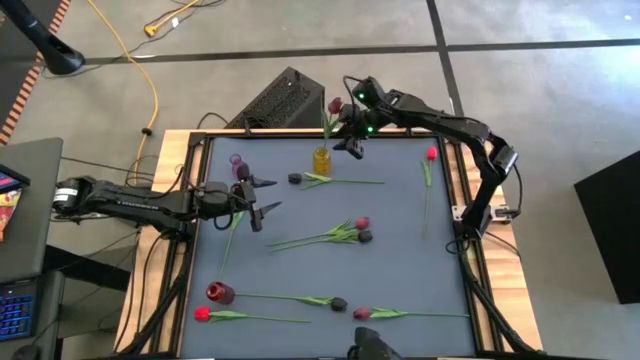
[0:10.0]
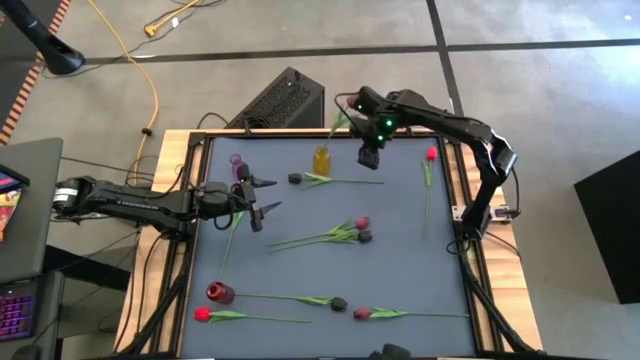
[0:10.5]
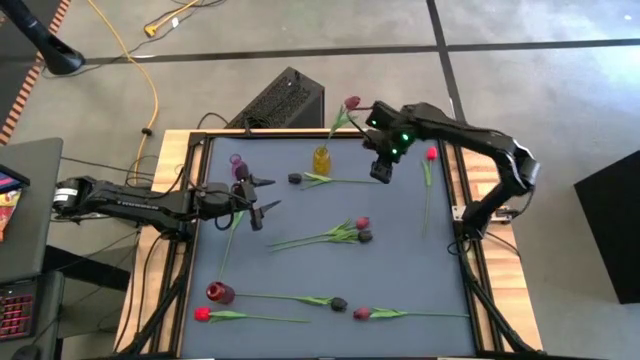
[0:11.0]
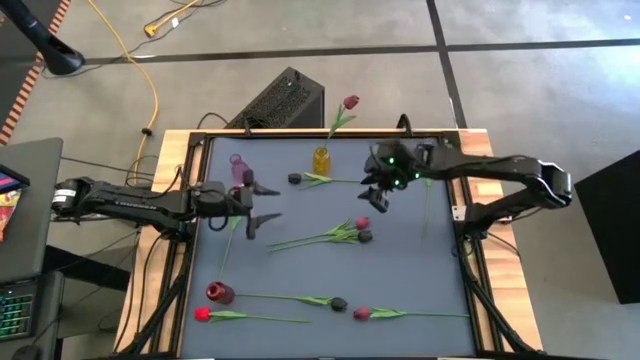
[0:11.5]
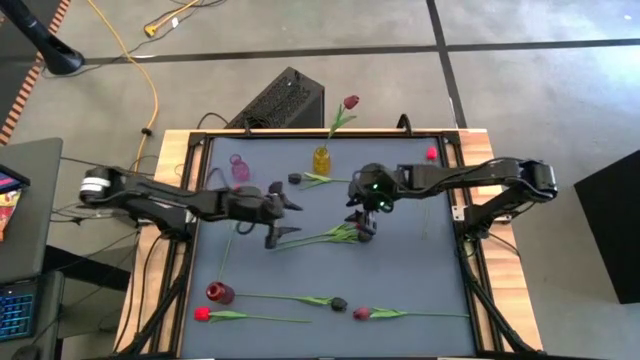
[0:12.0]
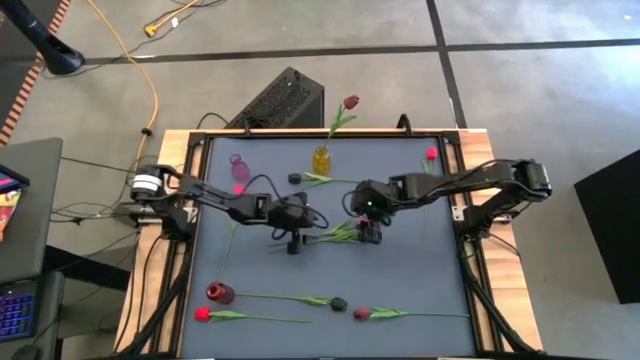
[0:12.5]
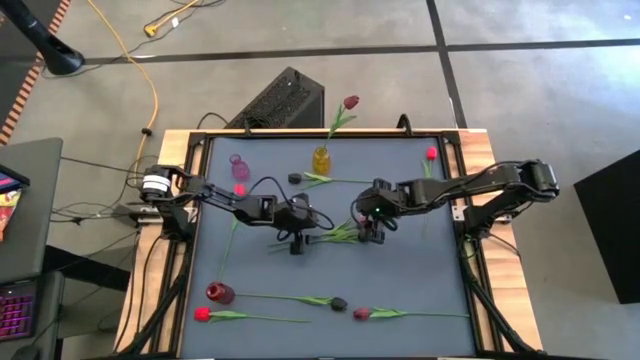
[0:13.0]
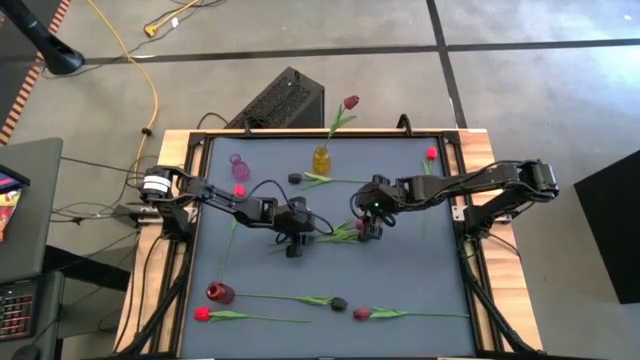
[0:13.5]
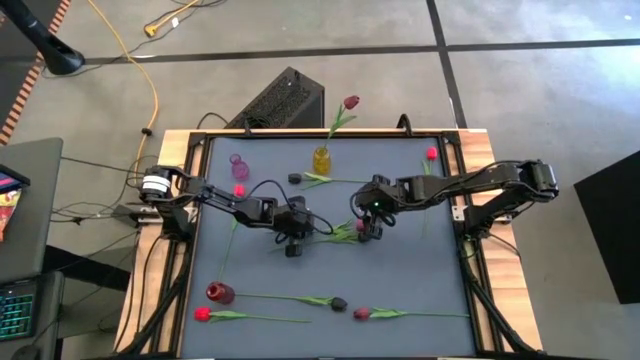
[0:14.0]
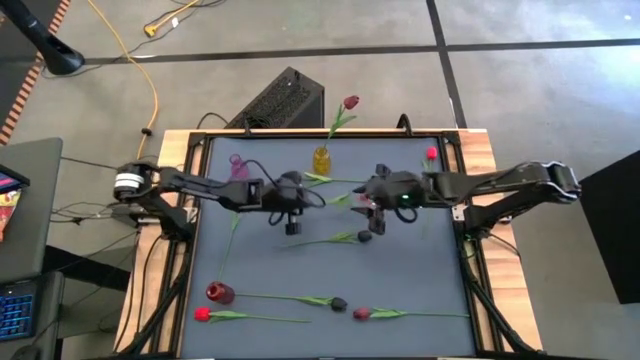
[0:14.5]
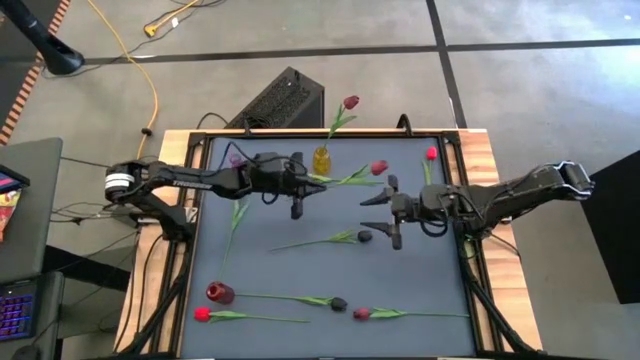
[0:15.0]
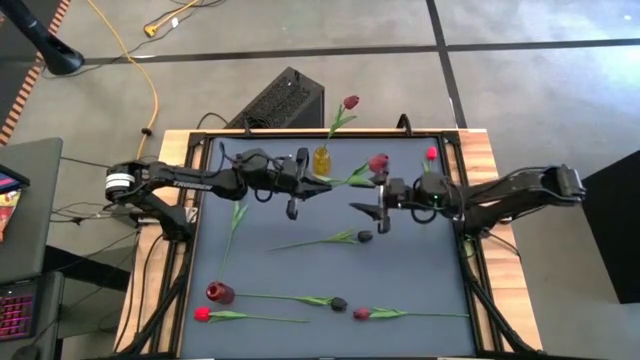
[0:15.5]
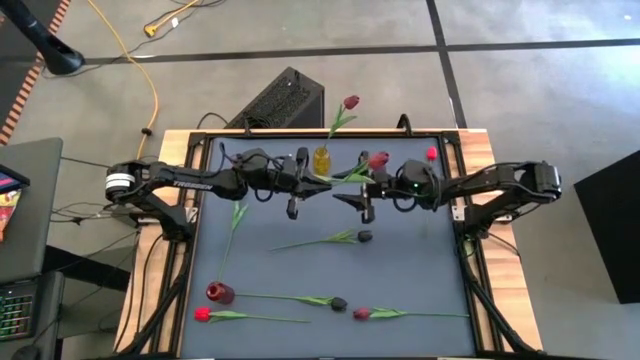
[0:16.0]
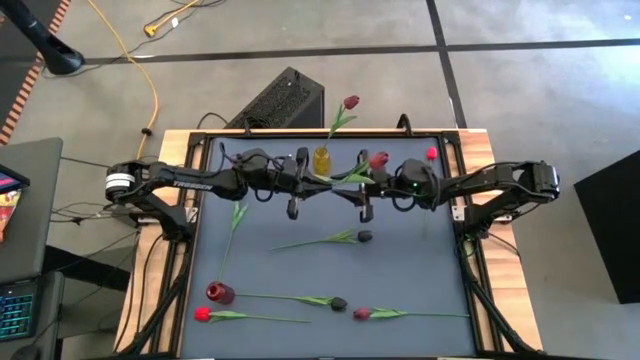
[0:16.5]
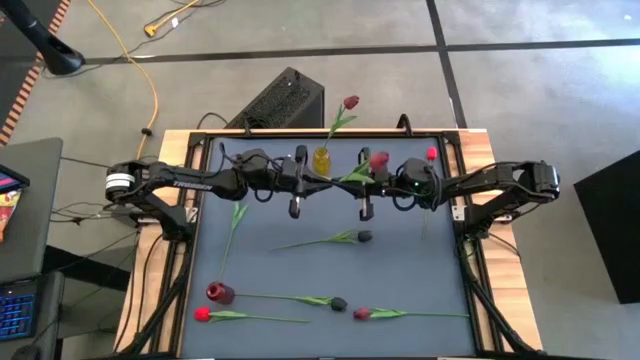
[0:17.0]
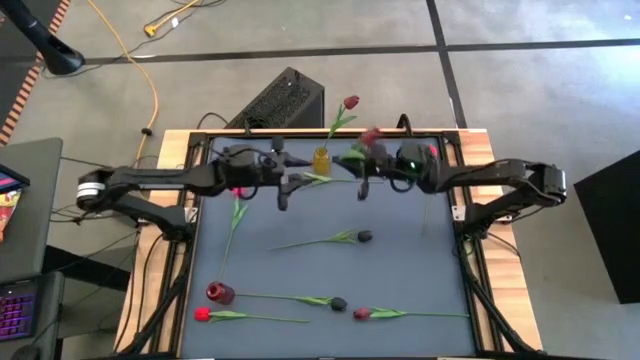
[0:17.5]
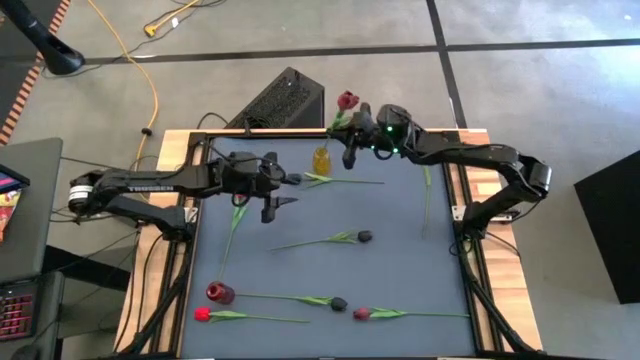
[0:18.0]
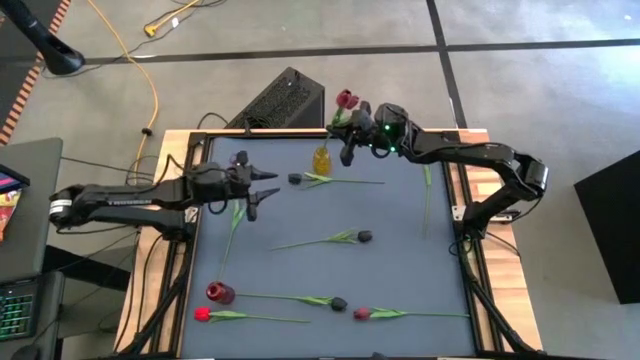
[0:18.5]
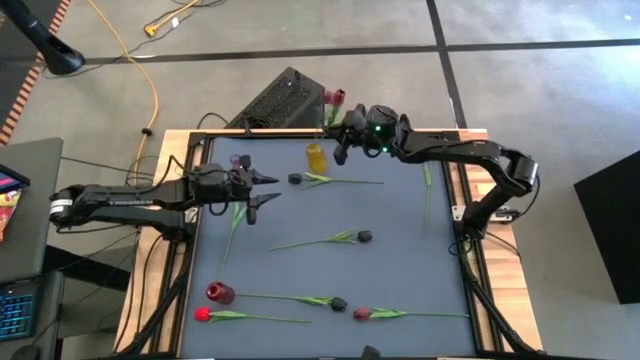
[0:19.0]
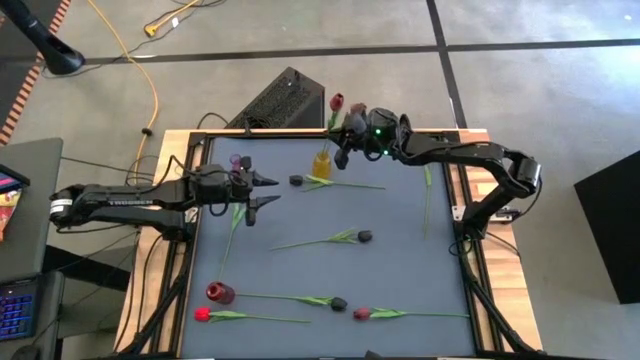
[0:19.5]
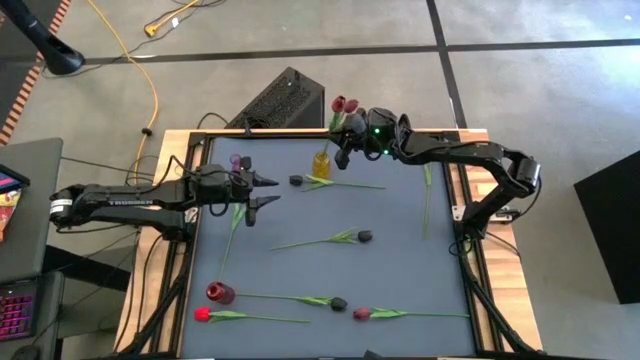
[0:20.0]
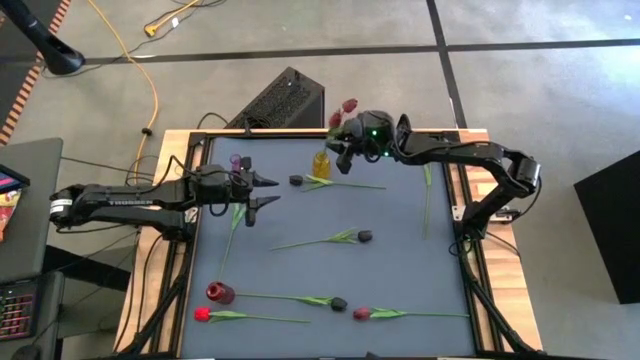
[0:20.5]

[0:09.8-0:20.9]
Task: Sort flowers into vase by color
Put the top dark red flower into the yellow vase

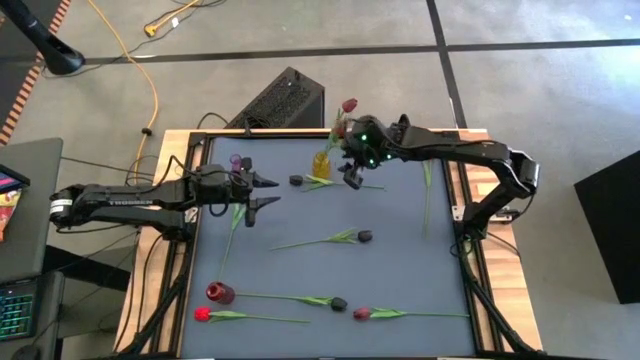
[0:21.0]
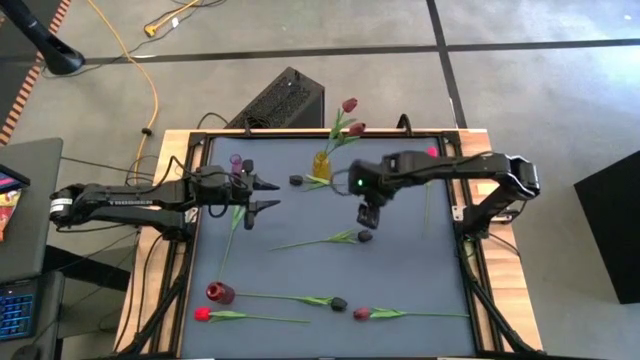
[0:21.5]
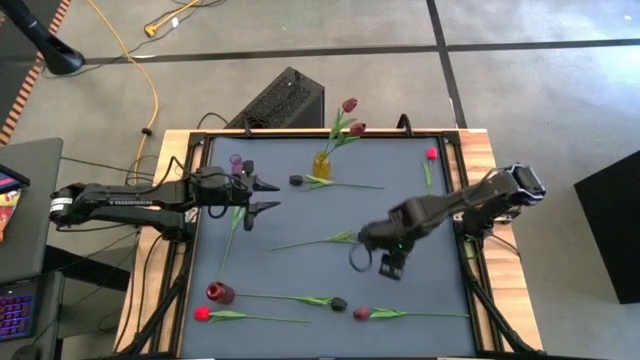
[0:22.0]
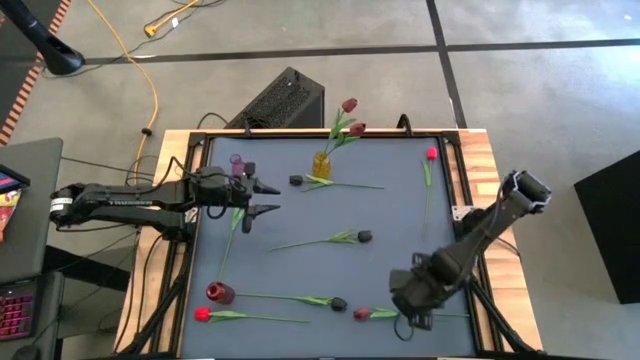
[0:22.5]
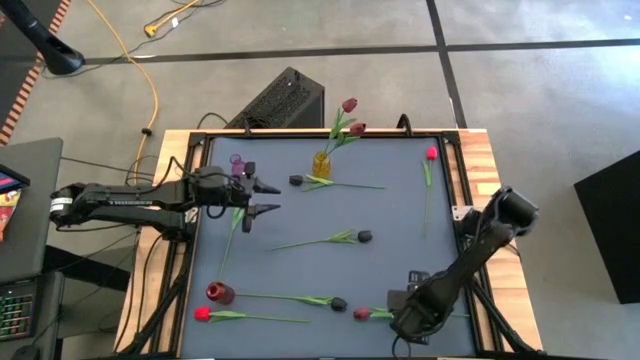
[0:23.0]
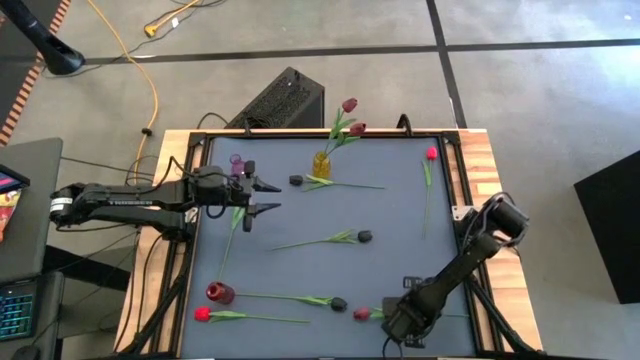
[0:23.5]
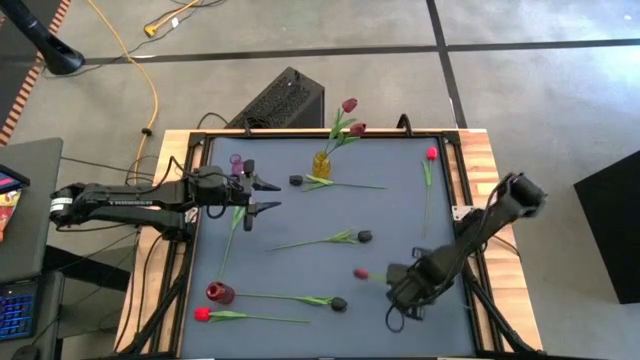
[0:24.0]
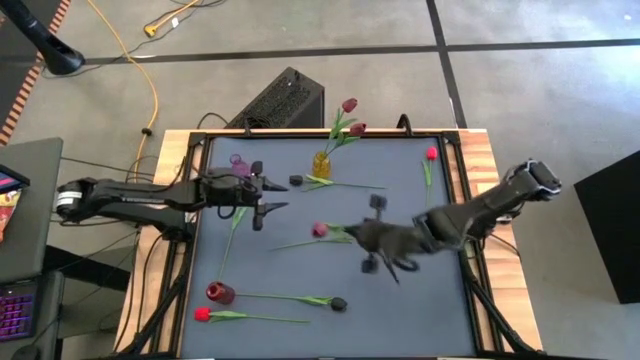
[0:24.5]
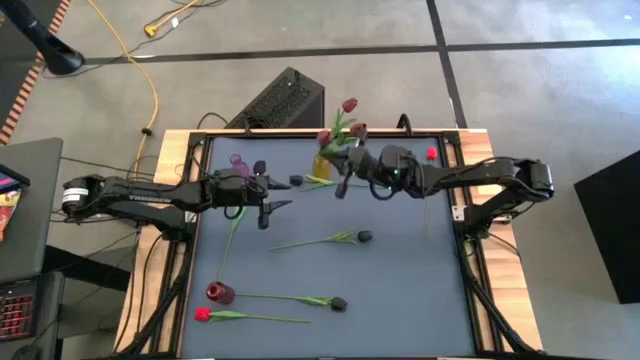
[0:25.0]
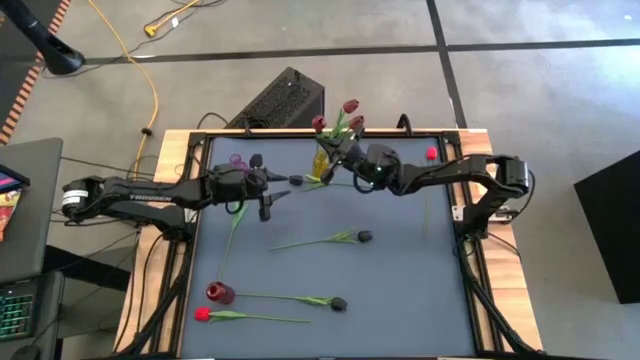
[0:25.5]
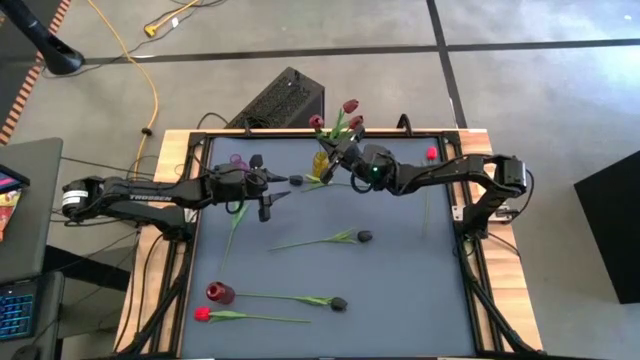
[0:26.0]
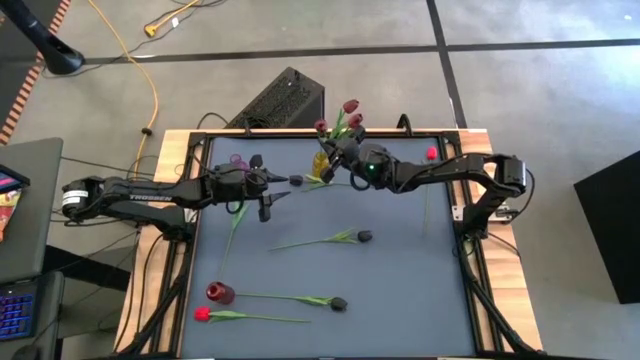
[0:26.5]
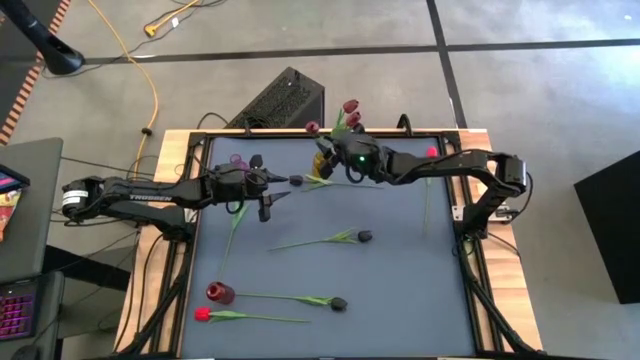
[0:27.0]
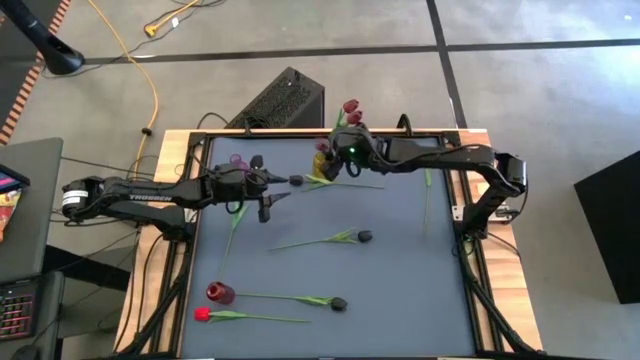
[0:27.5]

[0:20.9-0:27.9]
Put the dark red flower into the yellow vase
